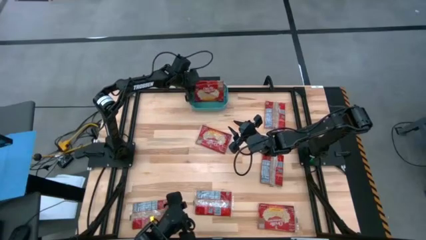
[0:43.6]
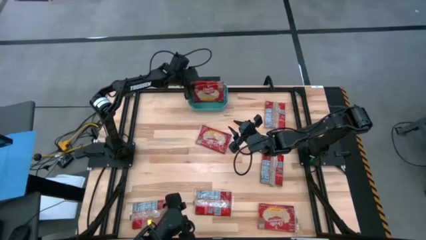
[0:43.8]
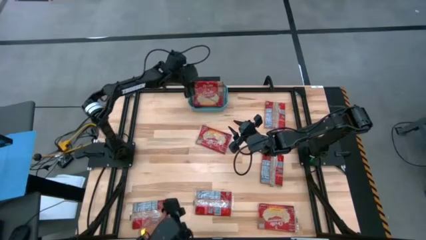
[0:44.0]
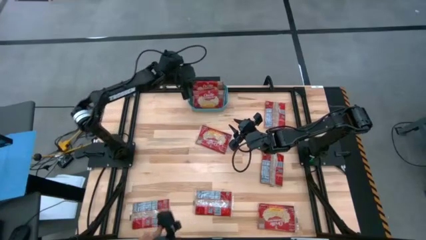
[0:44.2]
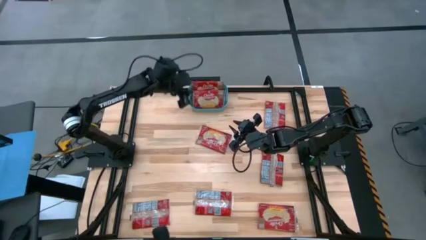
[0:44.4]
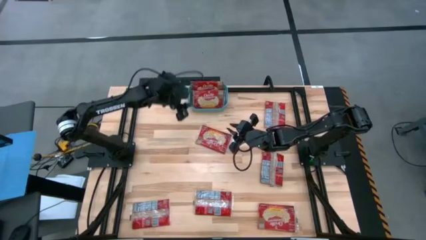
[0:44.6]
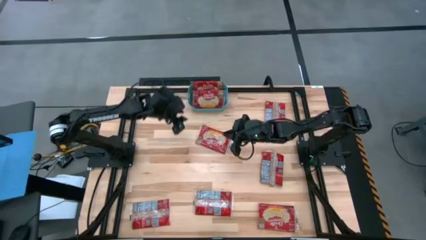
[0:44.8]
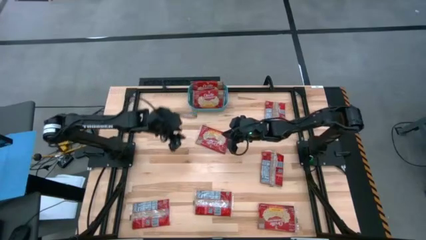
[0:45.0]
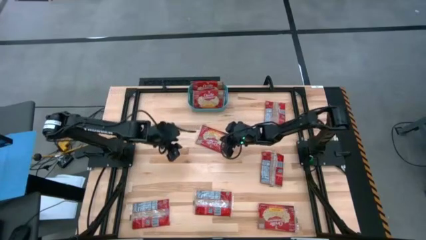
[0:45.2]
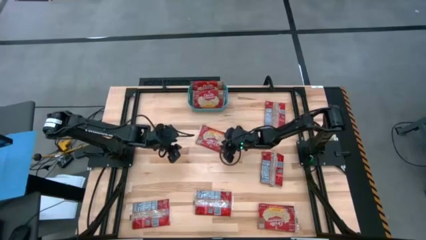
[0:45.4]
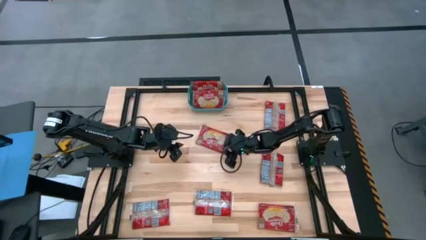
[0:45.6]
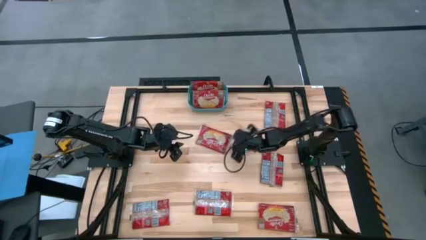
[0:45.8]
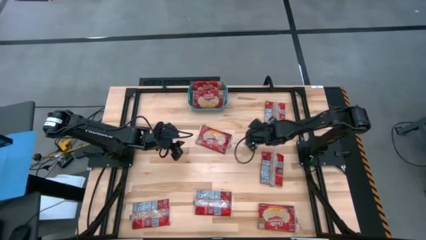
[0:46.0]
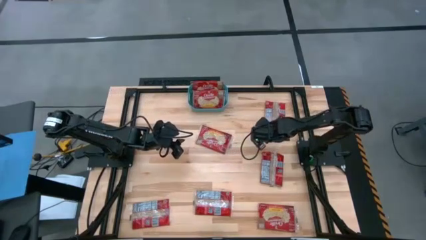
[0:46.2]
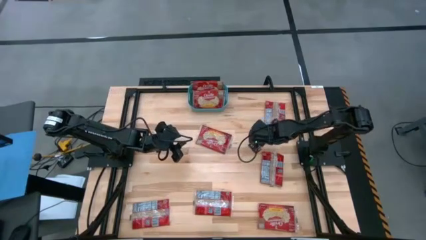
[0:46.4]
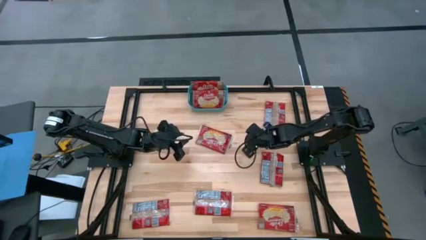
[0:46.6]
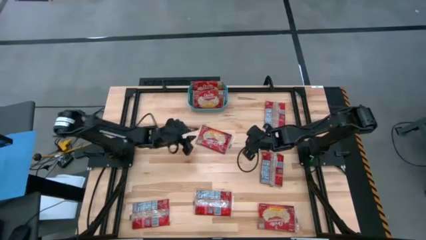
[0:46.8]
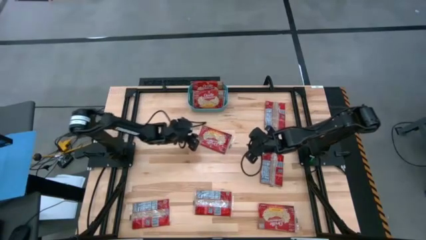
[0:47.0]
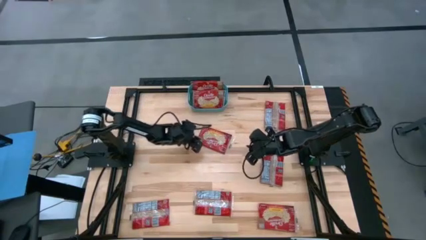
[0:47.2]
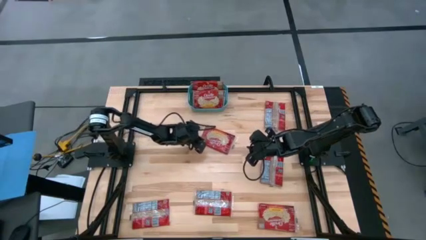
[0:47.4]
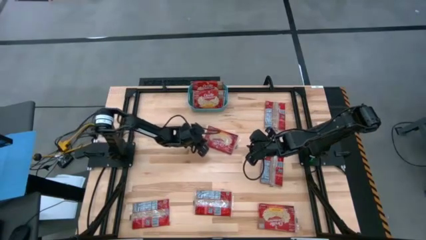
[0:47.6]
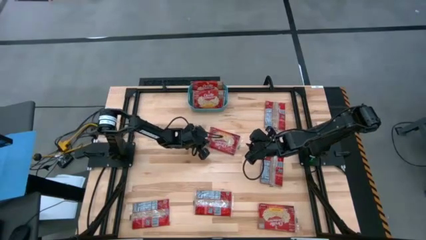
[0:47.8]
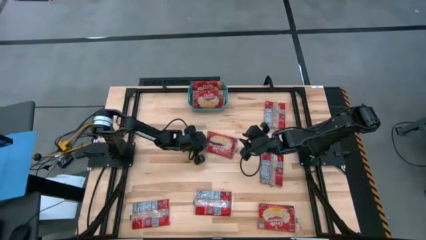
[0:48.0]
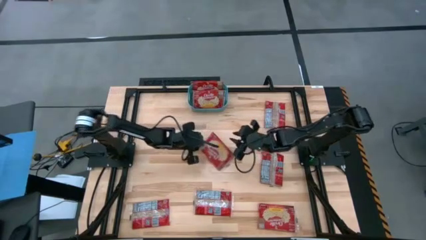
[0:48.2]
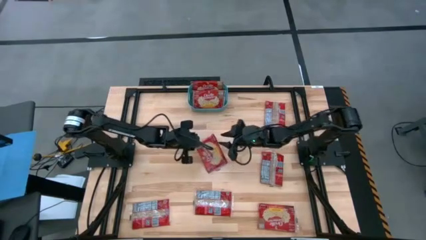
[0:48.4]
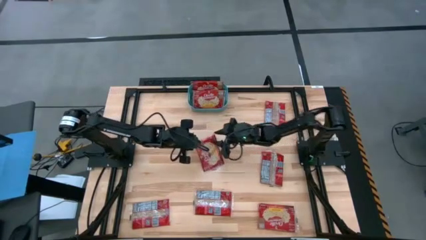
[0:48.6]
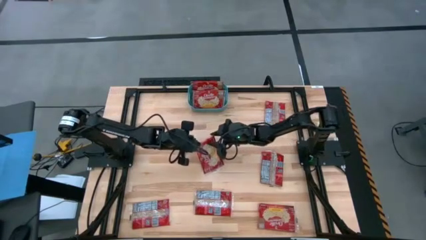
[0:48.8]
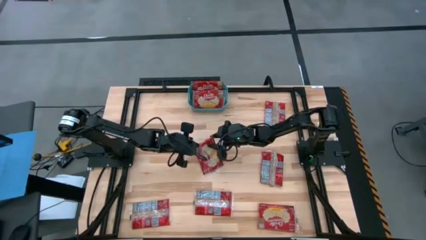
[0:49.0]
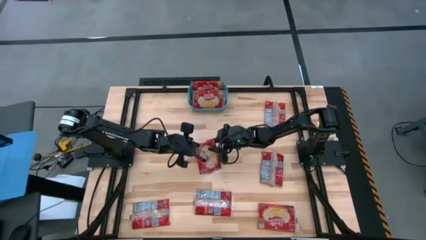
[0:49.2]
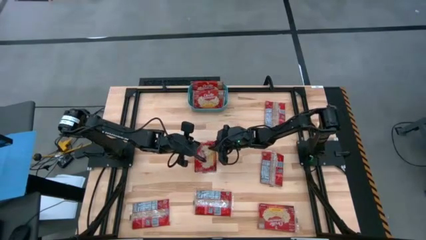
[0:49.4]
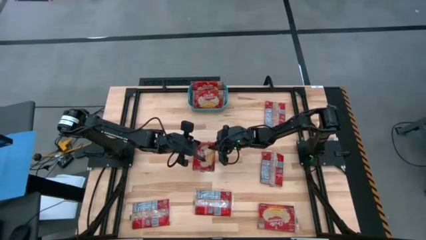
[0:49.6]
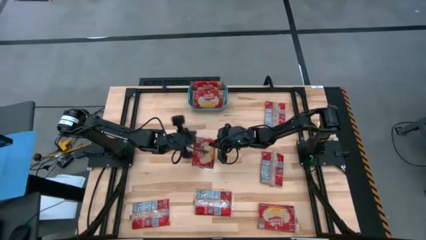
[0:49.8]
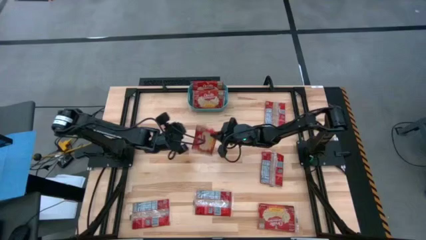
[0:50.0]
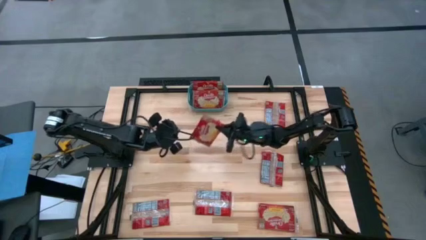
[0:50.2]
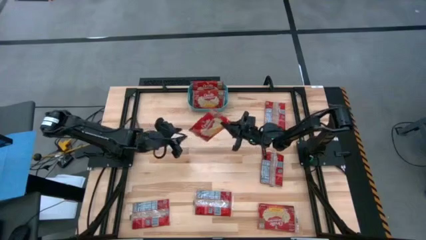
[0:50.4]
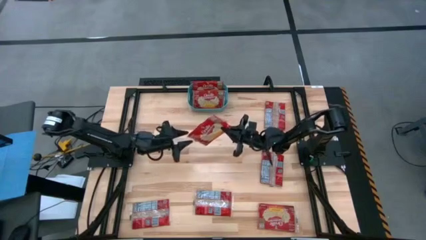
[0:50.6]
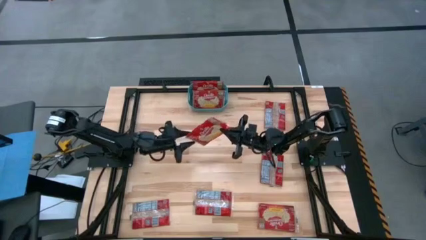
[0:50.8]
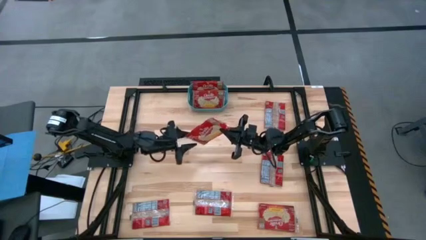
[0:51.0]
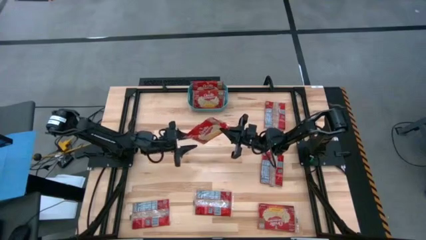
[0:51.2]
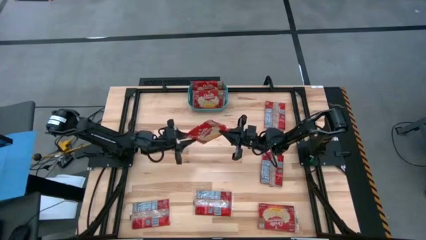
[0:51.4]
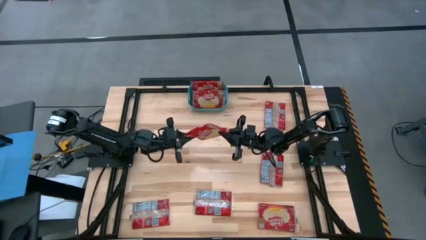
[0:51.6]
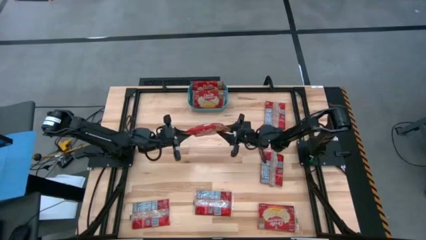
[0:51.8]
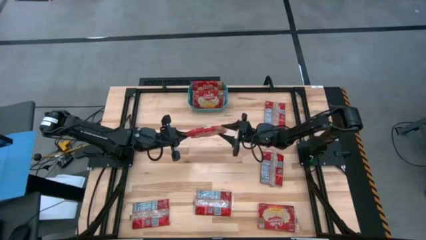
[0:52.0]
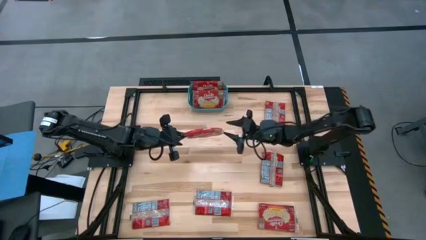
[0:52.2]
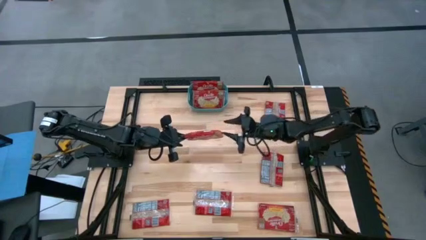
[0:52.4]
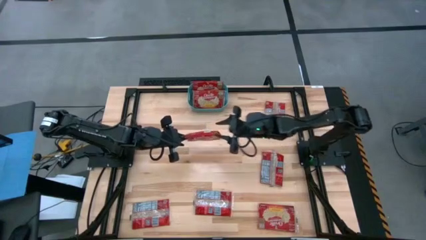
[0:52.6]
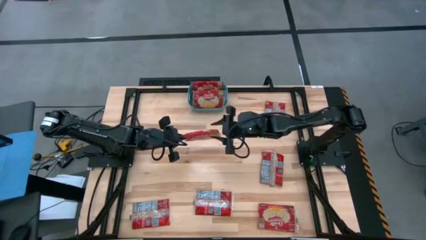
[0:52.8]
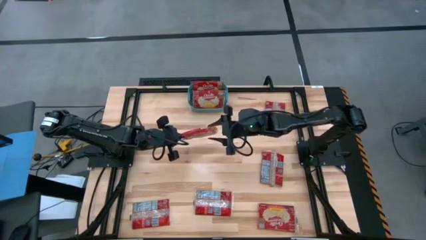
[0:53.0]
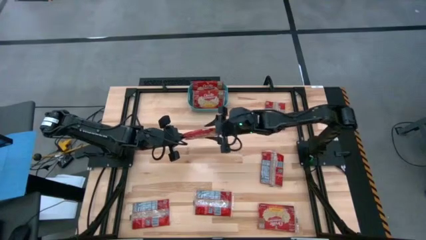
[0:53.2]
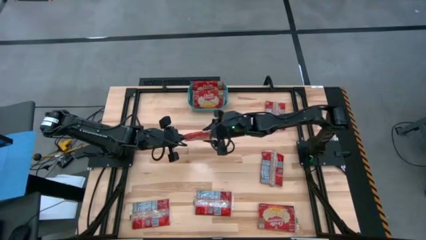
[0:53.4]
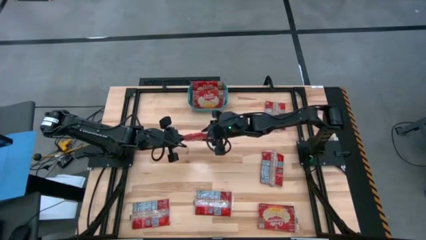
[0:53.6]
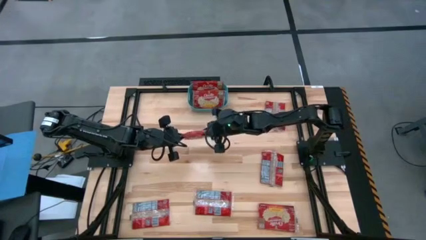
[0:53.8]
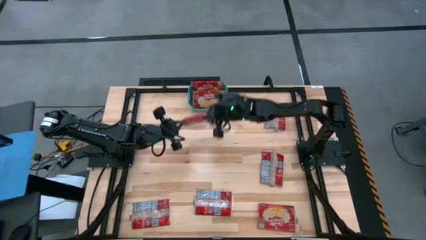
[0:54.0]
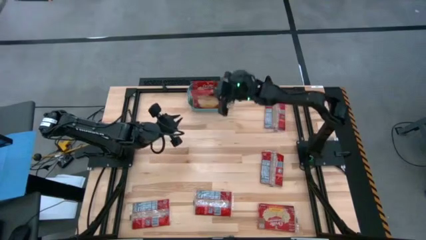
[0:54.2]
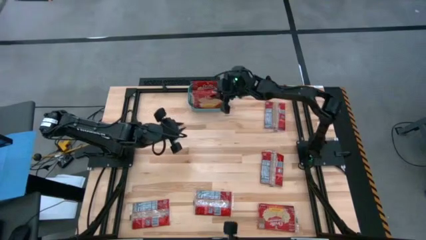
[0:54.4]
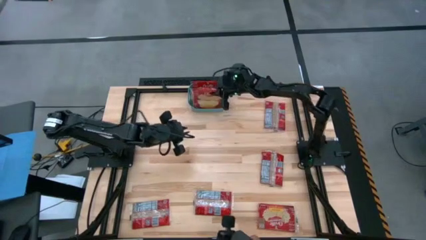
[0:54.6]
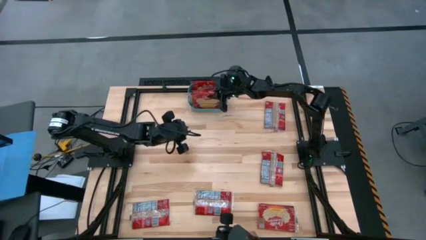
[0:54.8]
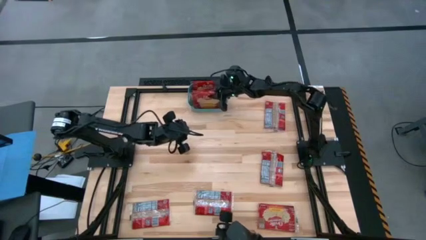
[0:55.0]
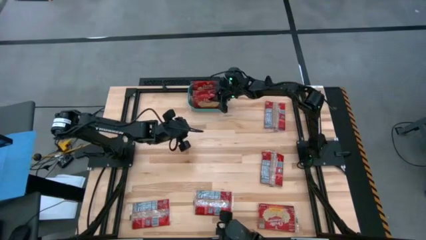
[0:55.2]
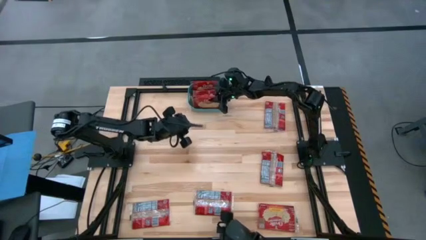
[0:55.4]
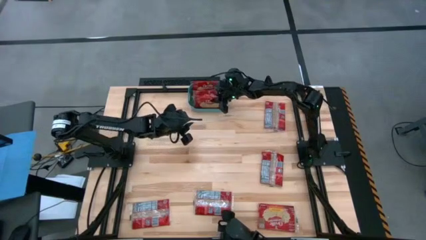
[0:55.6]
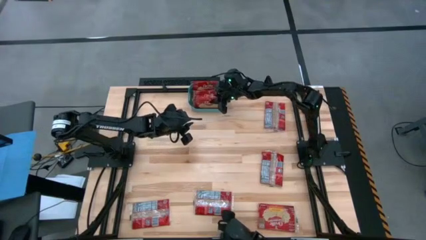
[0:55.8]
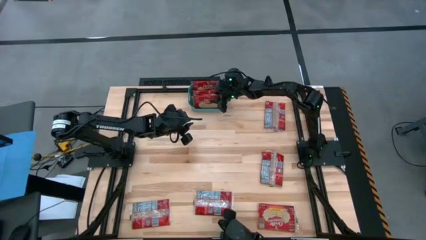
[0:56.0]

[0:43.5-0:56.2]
Task: Sort popcorn bags into baskets
Put the red popcorn bag into the green basket

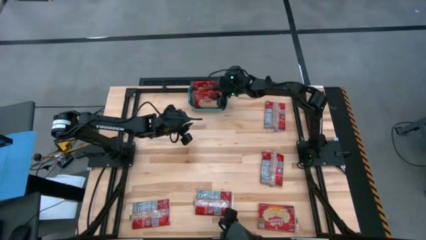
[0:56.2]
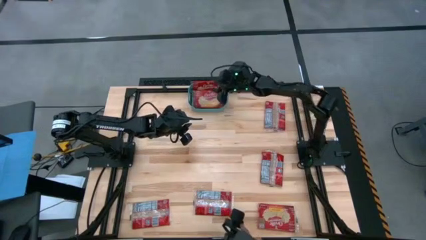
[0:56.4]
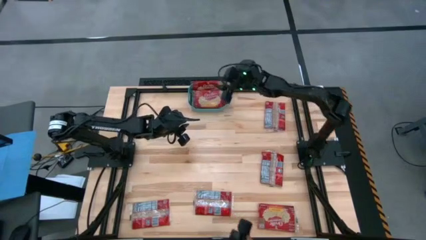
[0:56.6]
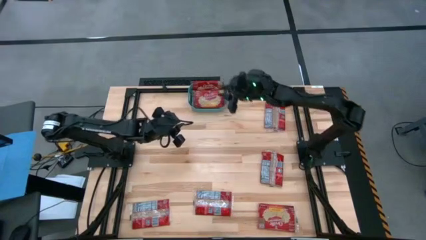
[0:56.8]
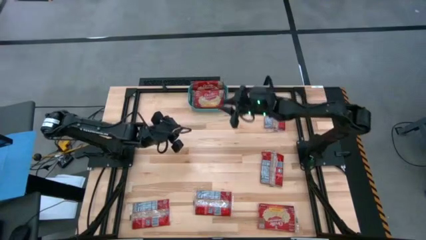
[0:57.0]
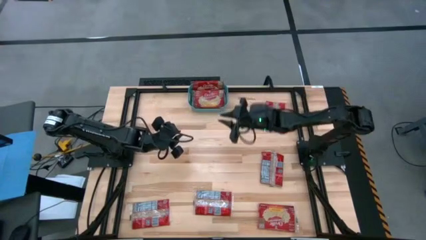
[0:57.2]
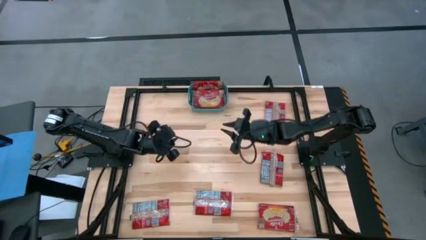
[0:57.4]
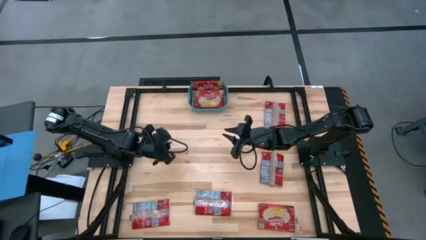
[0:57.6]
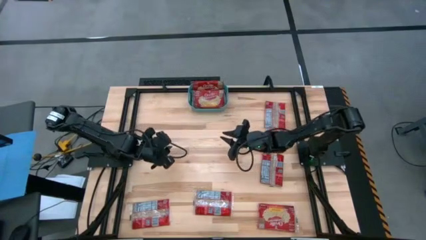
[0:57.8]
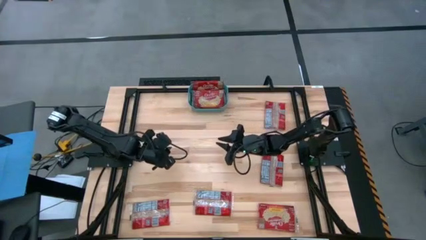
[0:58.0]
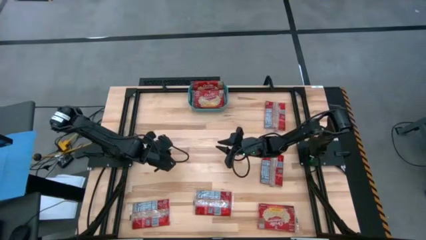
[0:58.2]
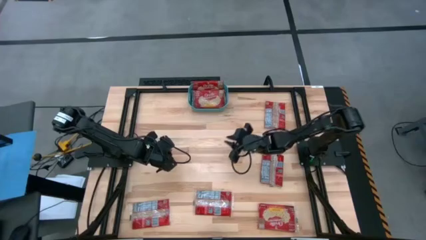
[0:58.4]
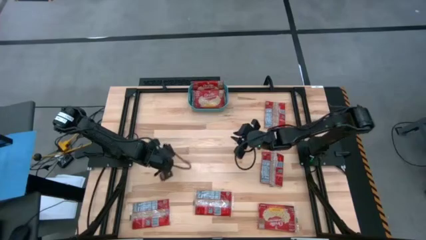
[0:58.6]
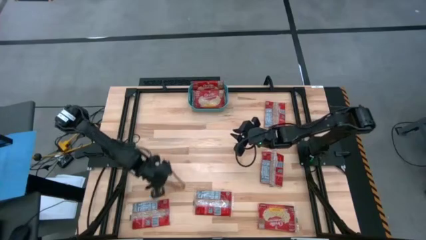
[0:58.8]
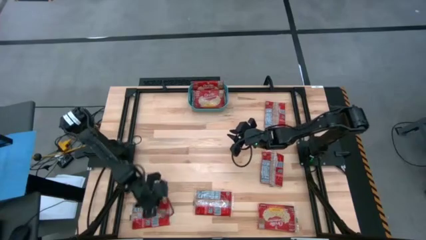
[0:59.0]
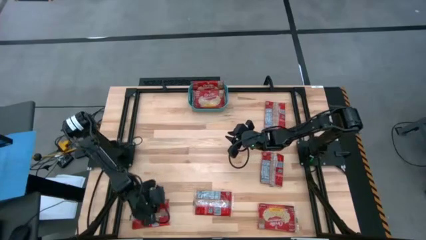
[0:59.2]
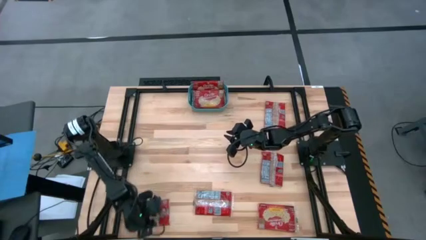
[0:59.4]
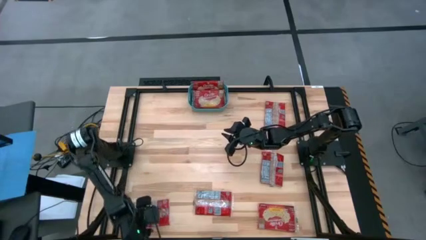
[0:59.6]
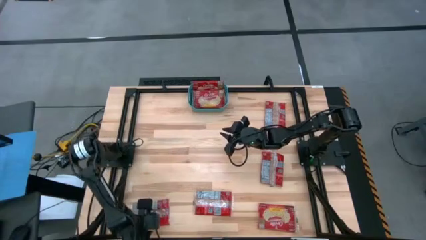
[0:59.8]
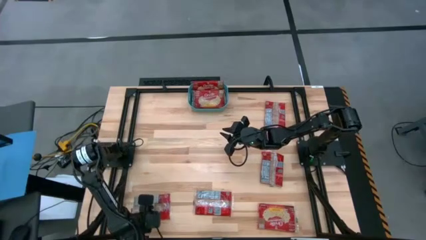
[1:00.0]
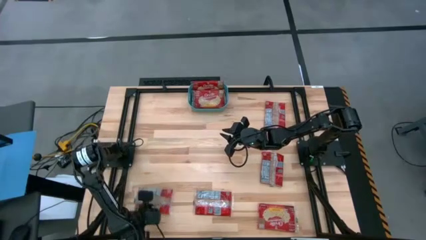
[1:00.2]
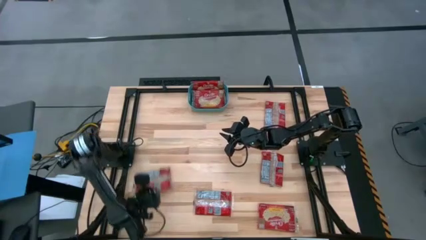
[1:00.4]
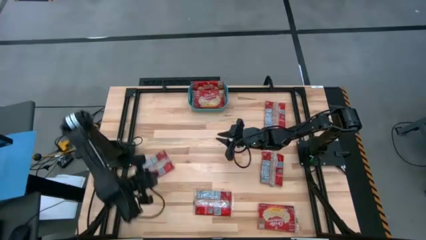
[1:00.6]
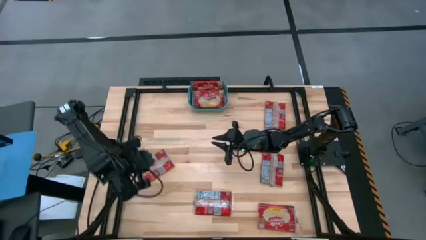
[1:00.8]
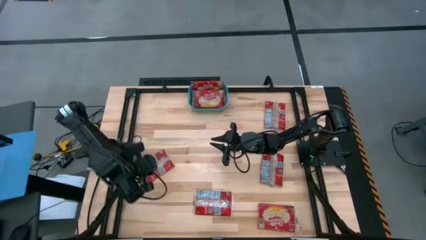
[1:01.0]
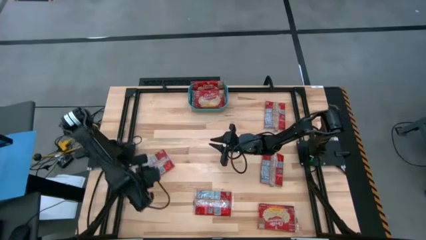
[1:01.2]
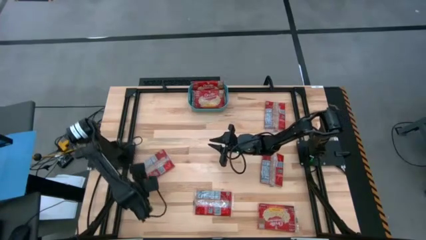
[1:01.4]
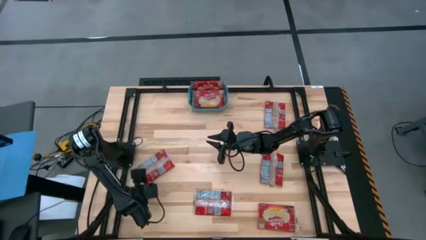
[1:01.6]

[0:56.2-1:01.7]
Put the red popcorn bag into the green basket
